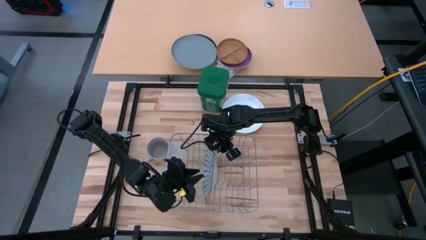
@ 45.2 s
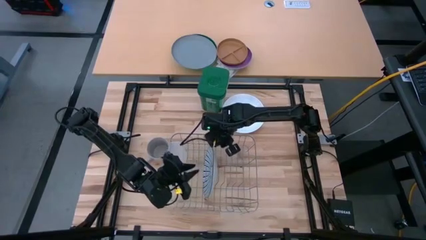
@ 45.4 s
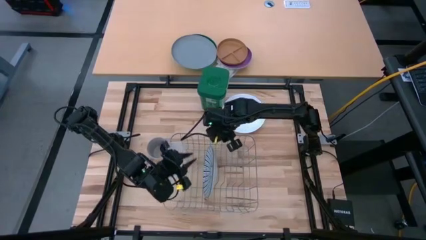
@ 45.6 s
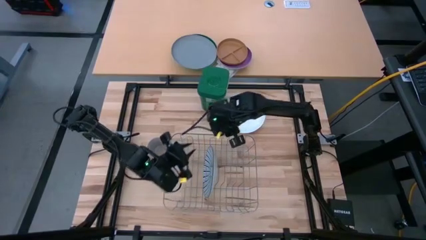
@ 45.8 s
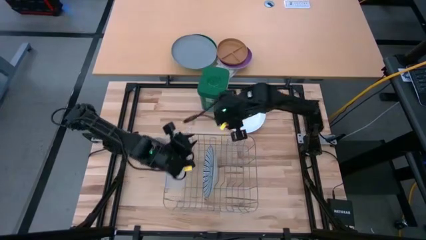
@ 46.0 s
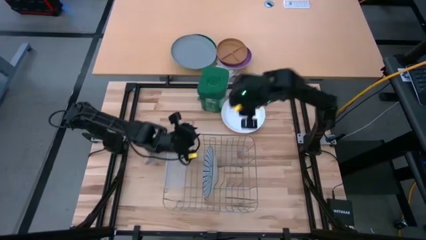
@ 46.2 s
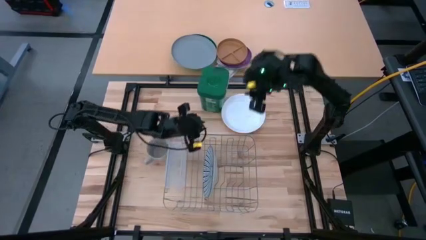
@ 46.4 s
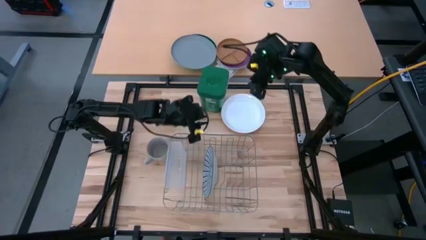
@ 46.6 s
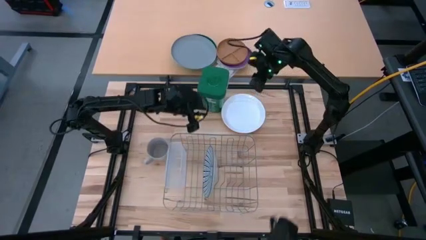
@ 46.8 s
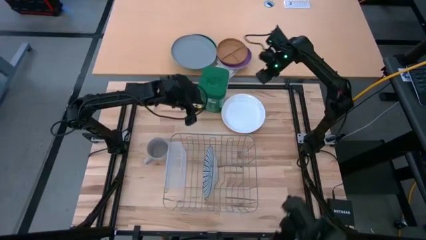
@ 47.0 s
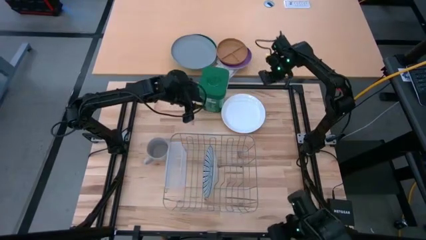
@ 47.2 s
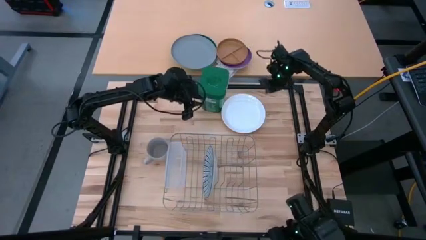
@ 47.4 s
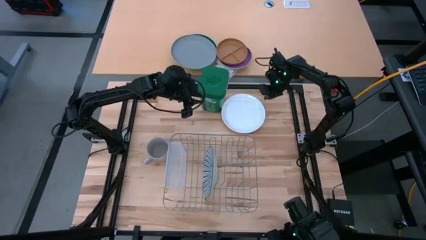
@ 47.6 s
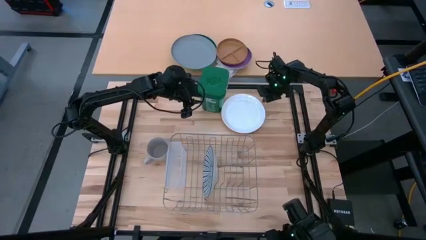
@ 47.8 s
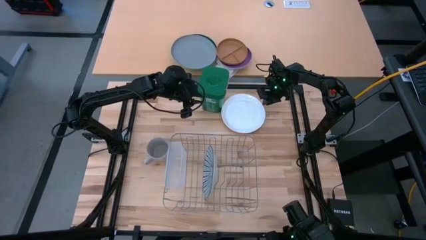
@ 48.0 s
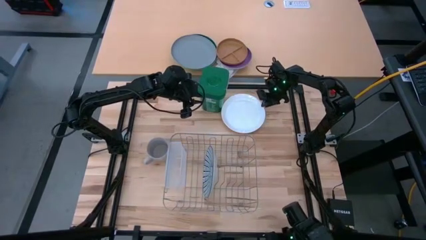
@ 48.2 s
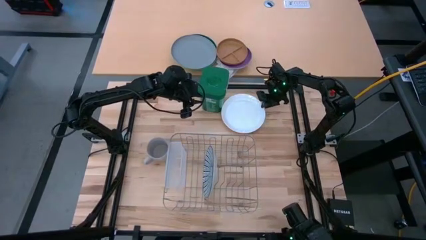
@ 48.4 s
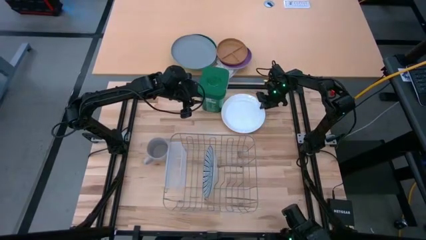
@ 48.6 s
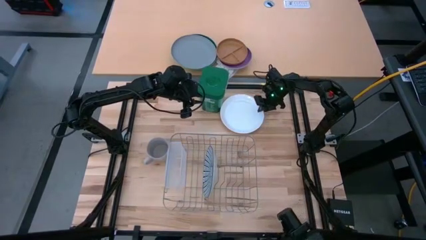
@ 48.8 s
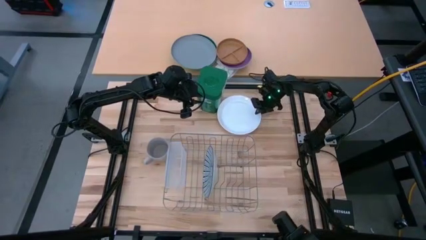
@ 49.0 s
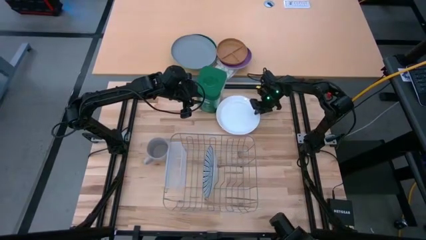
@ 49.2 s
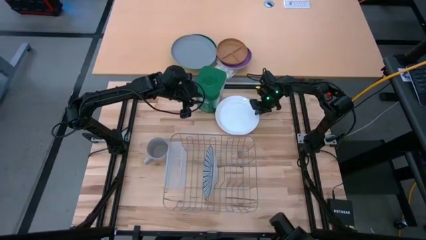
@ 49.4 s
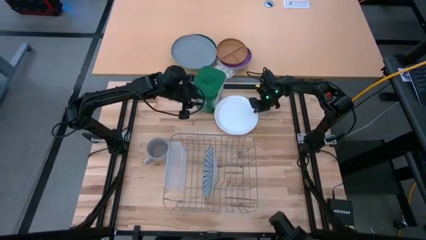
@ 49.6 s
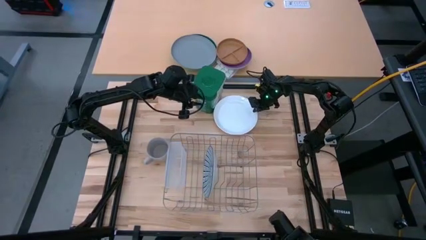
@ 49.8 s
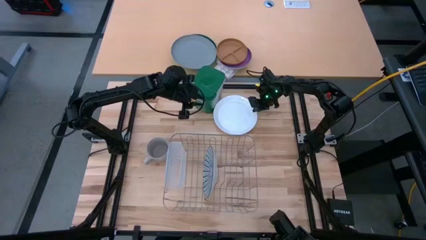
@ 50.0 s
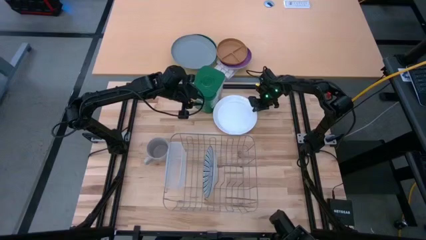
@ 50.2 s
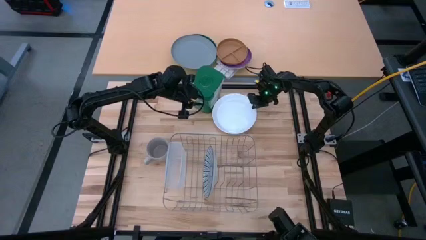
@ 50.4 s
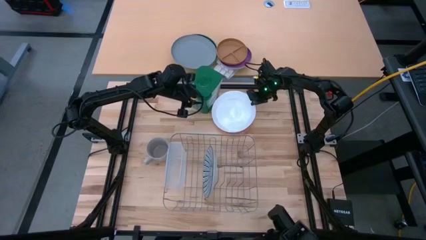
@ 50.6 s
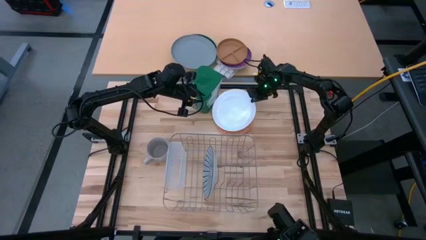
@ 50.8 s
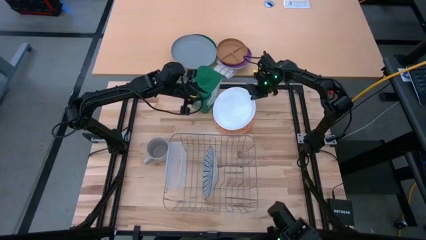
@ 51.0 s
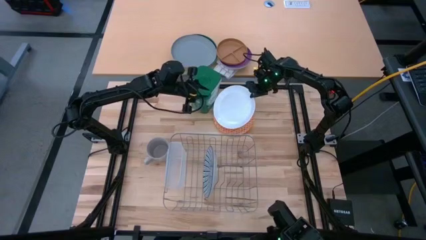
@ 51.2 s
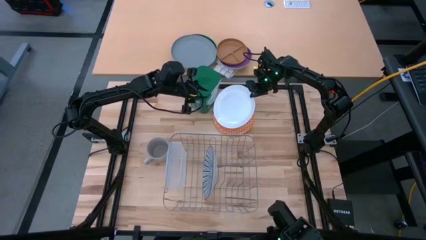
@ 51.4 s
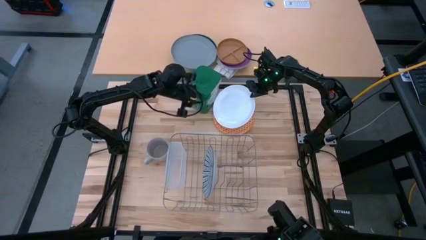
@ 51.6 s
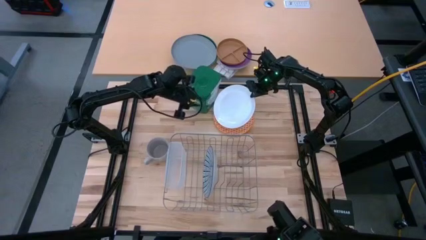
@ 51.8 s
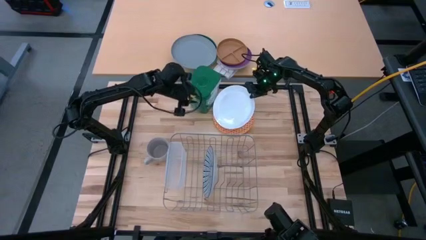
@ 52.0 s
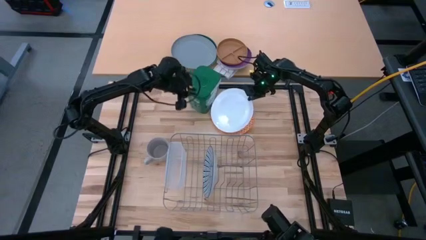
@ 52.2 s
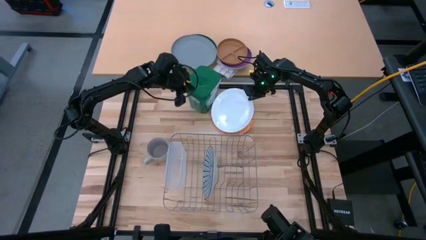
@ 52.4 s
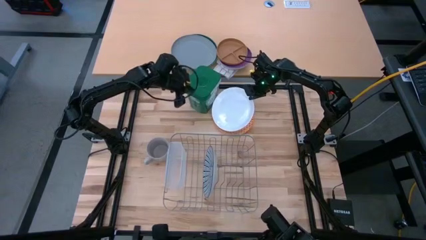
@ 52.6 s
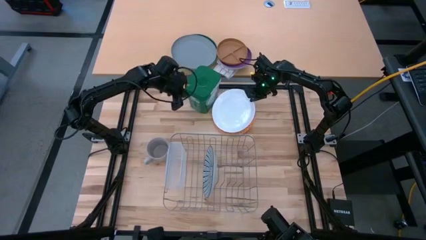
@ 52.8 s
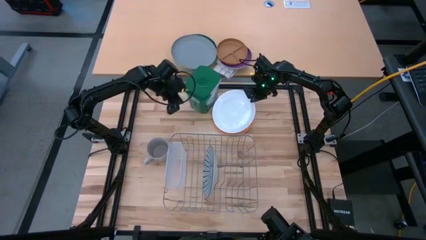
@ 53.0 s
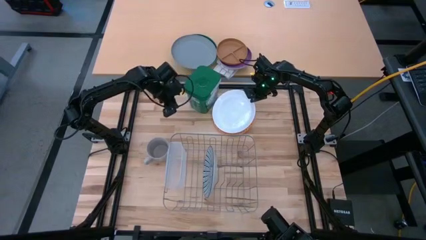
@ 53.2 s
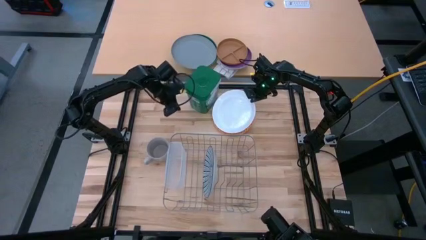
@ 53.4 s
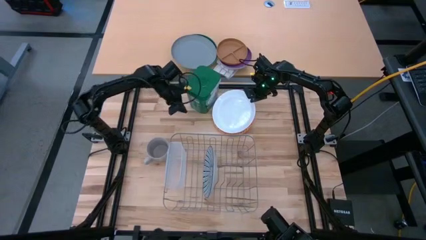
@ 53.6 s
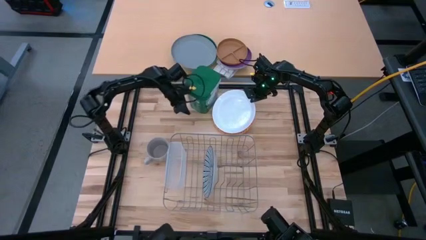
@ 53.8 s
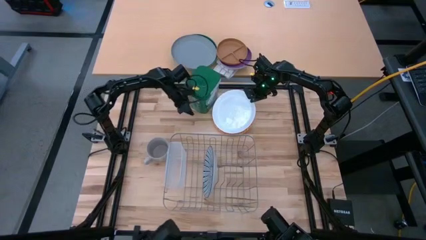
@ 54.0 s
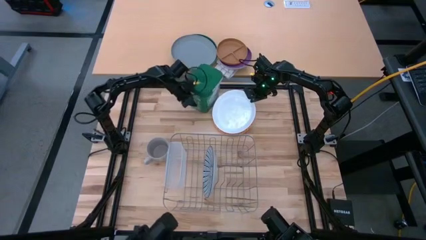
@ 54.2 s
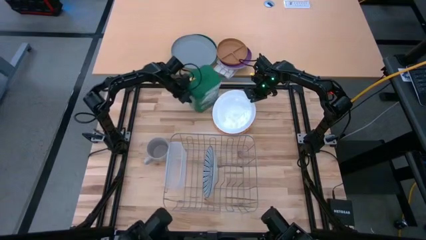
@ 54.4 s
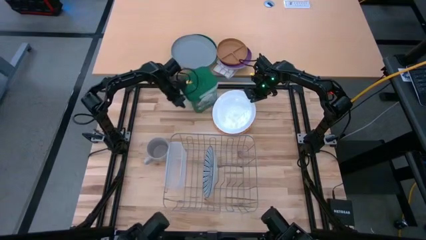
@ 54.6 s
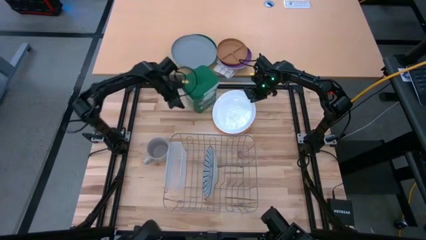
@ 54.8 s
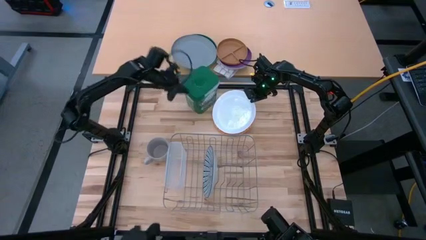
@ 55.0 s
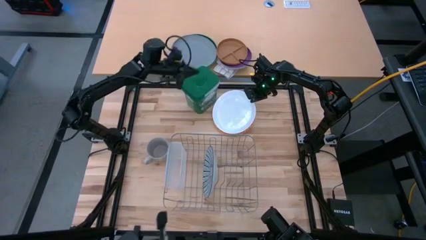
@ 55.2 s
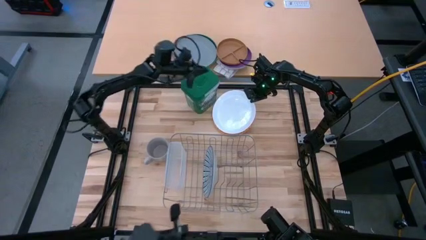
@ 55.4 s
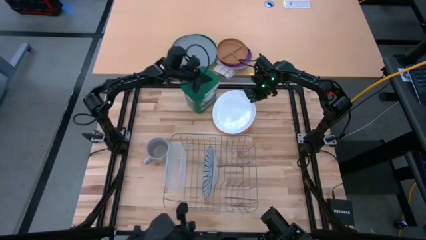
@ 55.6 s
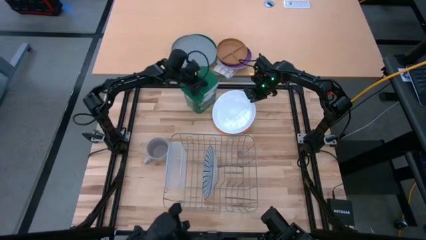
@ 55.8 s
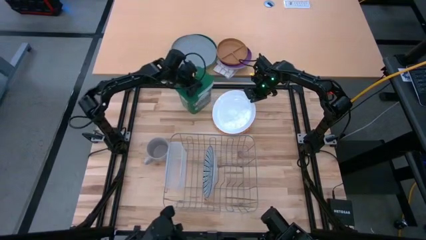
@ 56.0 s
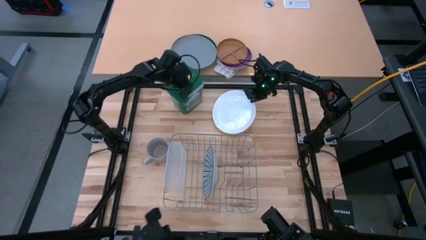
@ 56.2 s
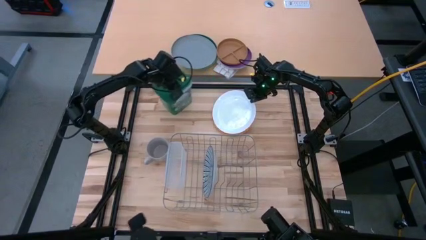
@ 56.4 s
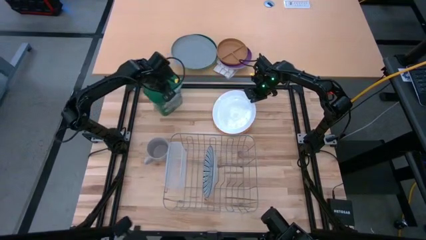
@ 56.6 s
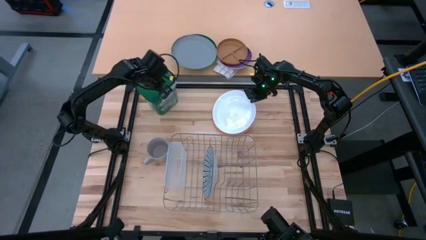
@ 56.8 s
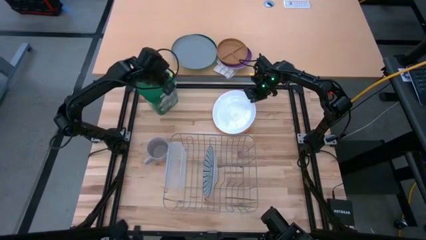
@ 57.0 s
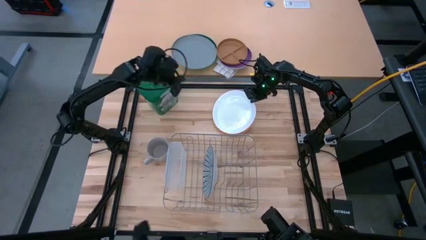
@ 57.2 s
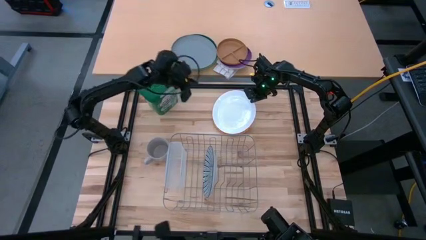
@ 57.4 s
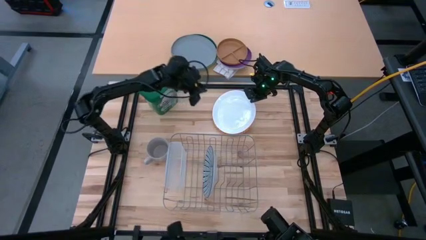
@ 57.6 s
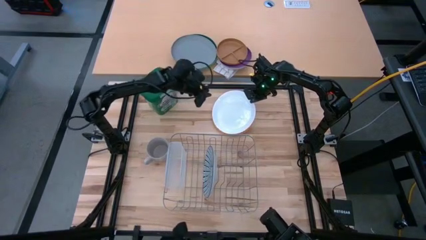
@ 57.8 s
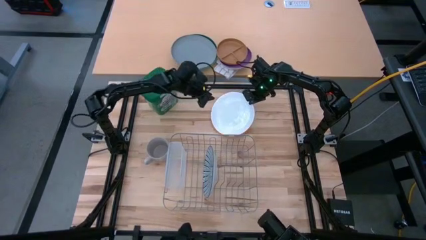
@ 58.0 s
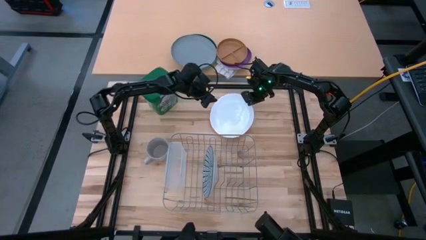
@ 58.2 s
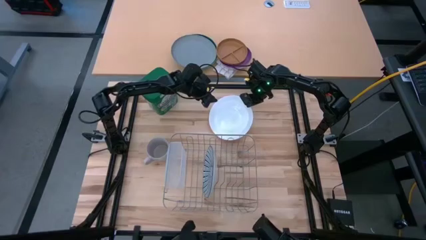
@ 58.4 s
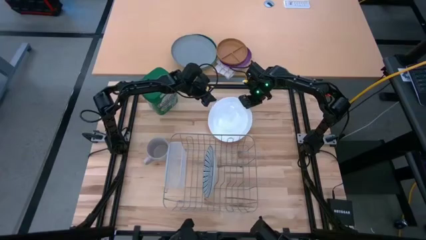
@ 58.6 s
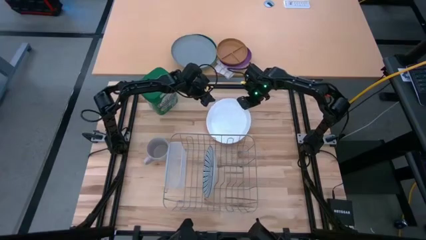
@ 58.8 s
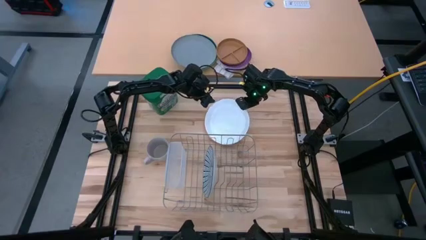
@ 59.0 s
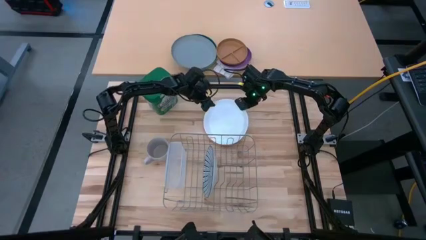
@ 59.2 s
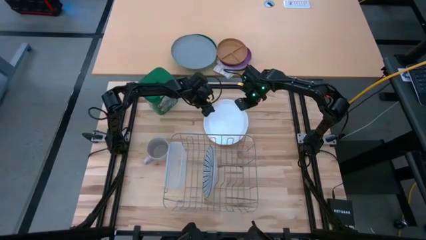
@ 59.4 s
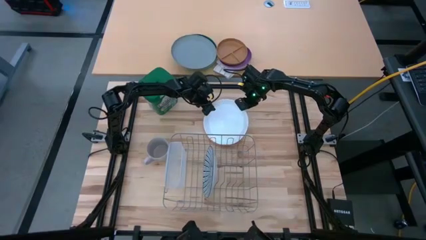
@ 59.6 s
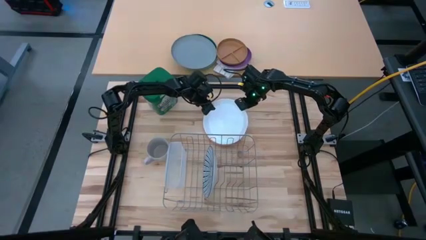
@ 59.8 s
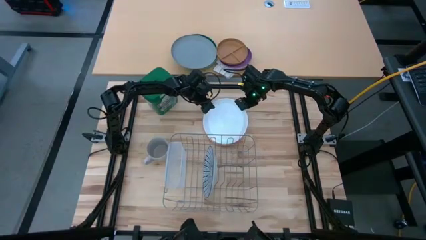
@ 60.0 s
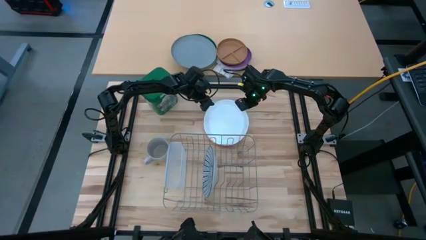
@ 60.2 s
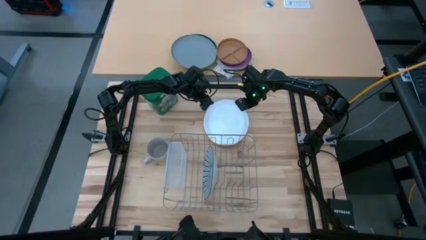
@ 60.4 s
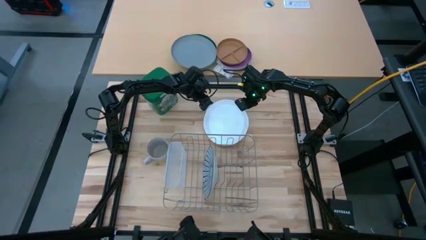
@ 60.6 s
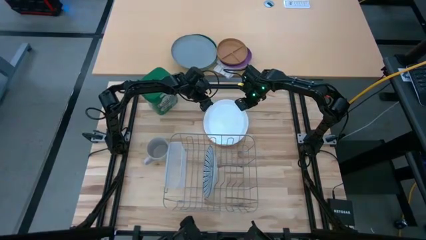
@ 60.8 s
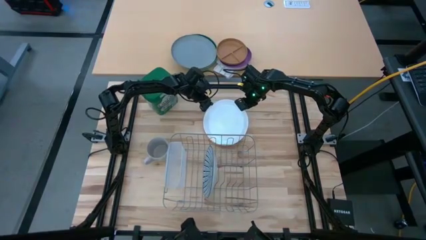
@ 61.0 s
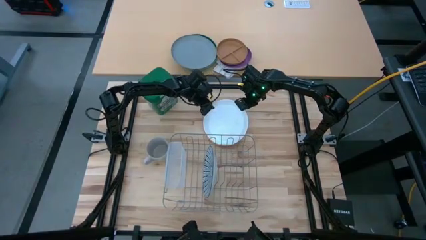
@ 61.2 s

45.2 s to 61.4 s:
Task: Sort dishes
Put the white plate in the dish rack

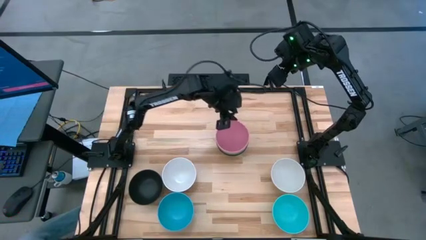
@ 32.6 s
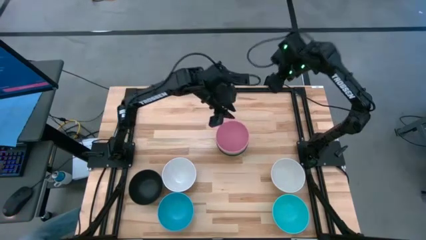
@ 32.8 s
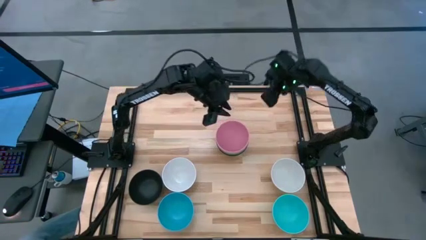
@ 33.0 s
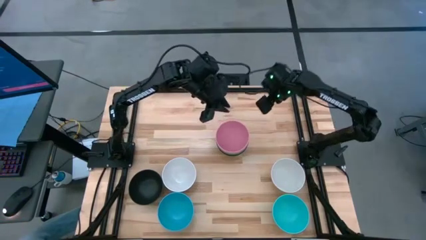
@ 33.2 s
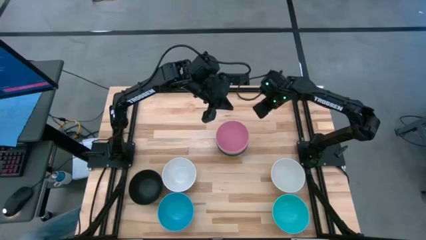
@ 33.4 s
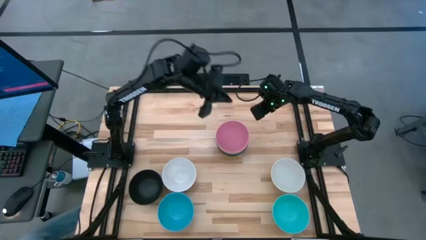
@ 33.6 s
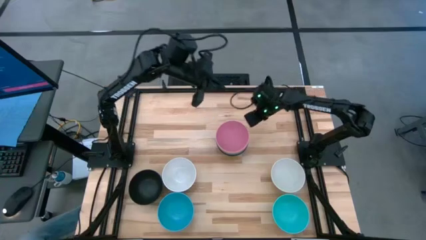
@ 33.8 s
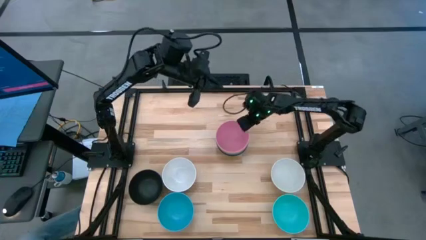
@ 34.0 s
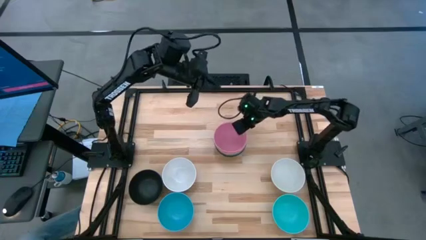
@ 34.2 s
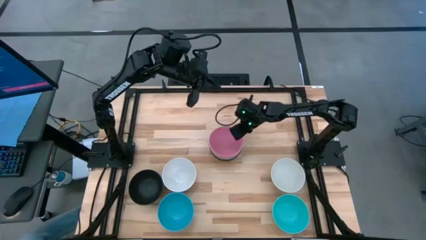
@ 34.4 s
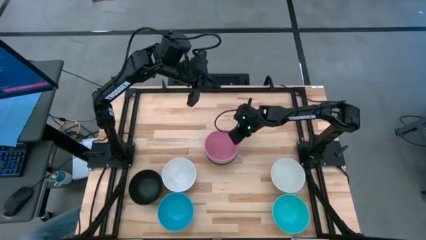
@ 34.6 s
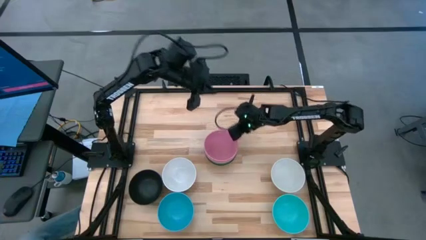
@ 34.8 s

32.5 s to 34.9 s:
Task: Nest bowls inside each other
Adjust the bowls
